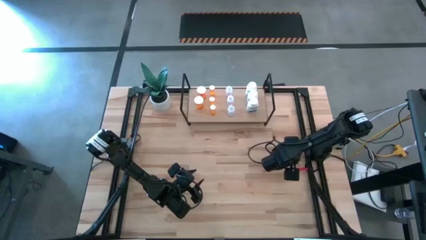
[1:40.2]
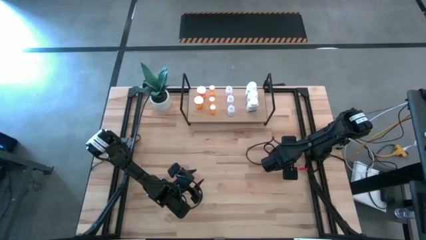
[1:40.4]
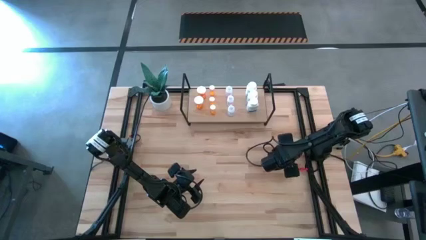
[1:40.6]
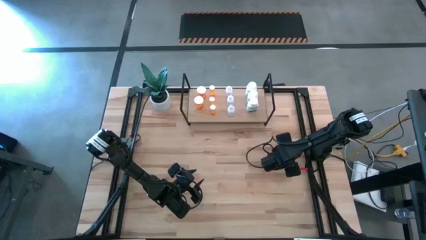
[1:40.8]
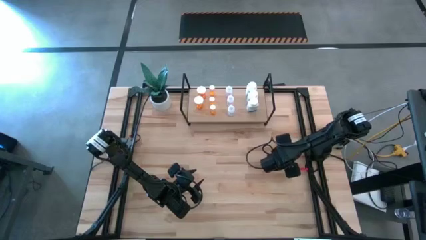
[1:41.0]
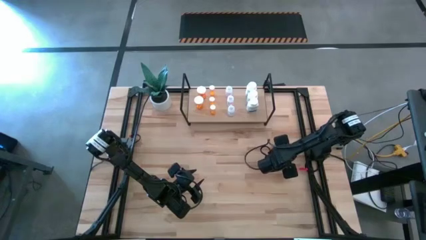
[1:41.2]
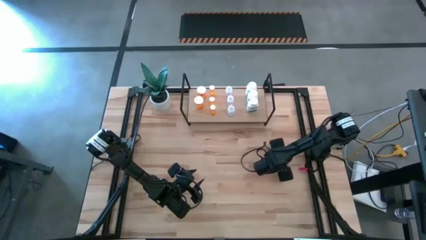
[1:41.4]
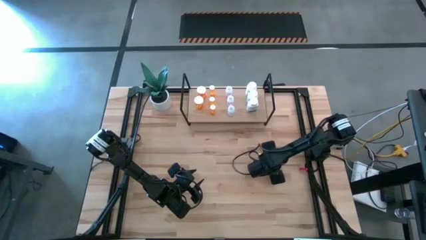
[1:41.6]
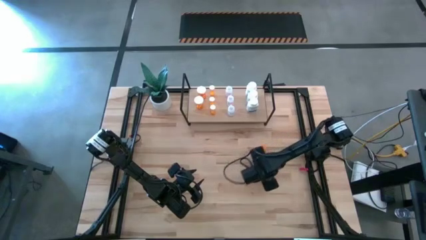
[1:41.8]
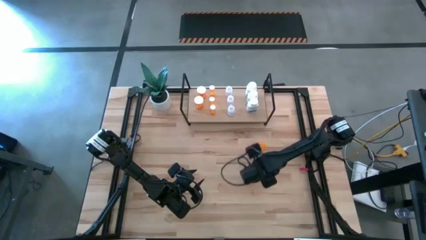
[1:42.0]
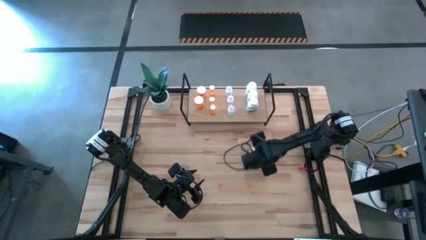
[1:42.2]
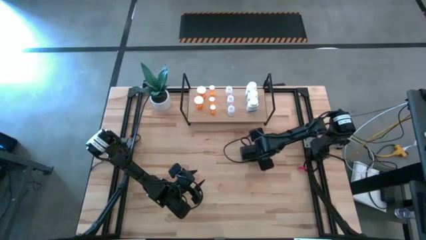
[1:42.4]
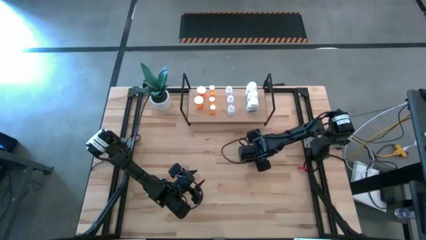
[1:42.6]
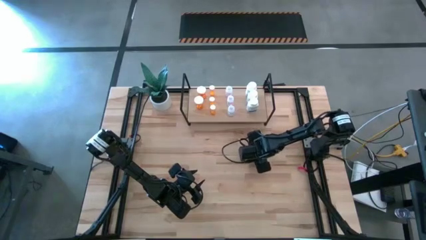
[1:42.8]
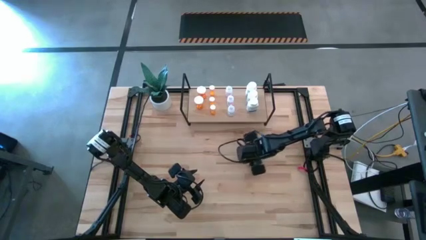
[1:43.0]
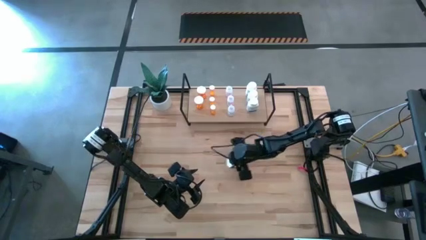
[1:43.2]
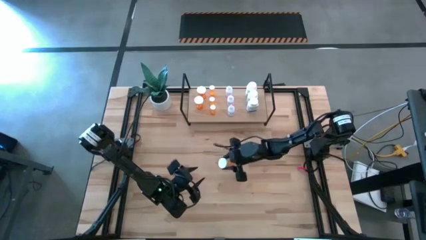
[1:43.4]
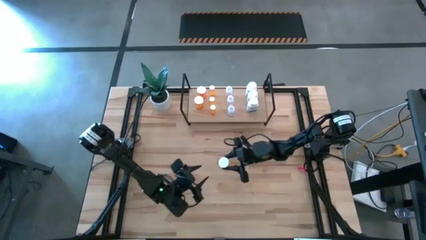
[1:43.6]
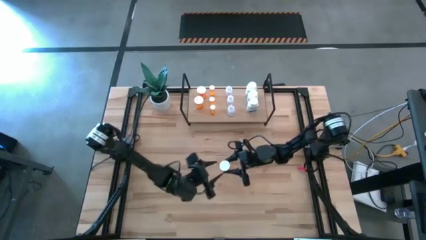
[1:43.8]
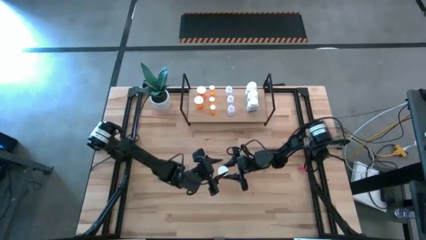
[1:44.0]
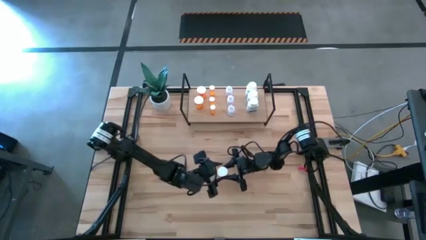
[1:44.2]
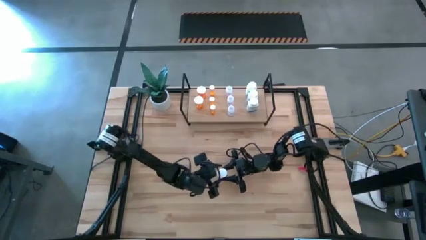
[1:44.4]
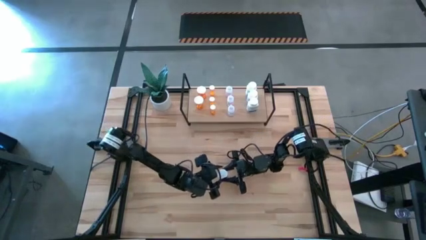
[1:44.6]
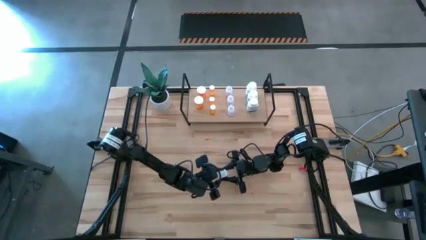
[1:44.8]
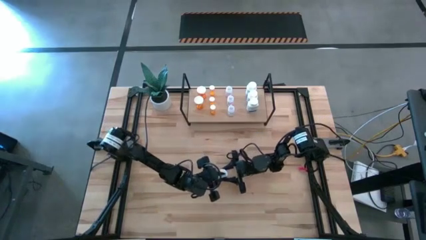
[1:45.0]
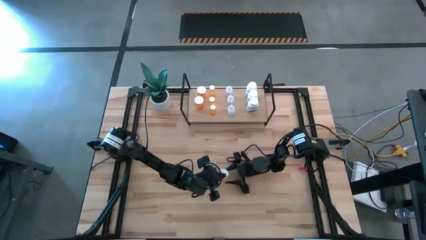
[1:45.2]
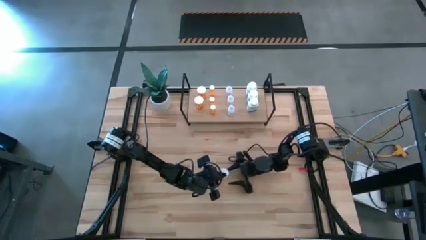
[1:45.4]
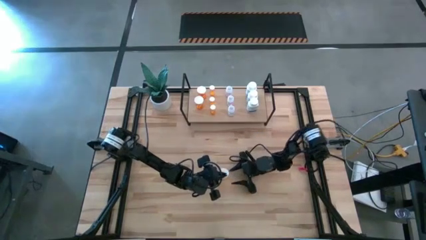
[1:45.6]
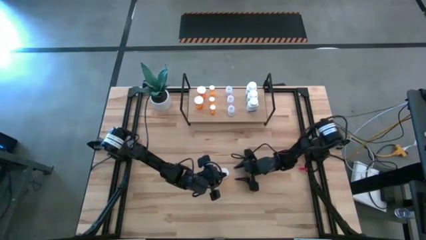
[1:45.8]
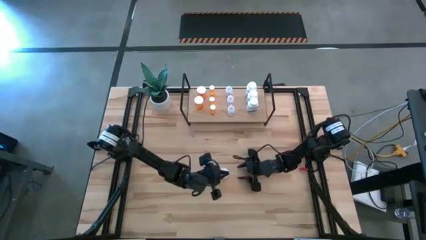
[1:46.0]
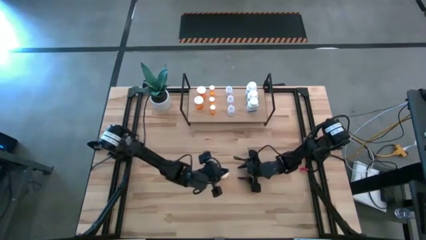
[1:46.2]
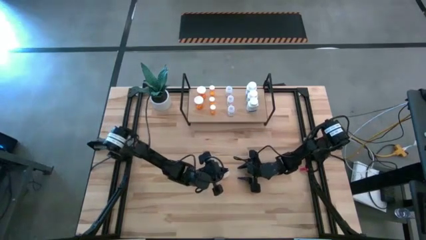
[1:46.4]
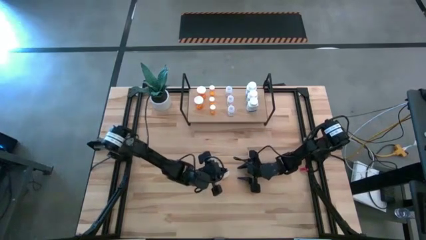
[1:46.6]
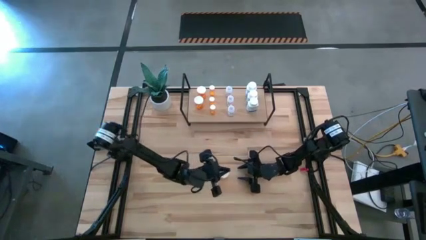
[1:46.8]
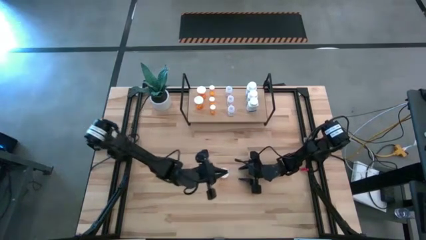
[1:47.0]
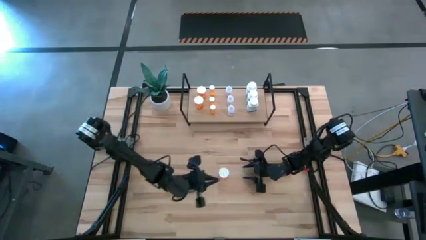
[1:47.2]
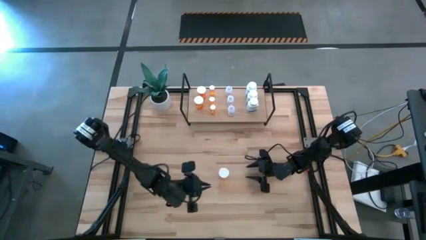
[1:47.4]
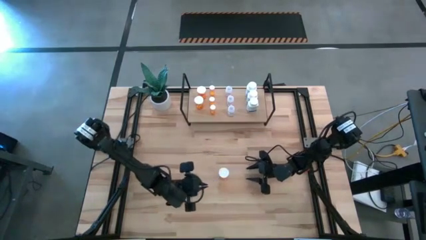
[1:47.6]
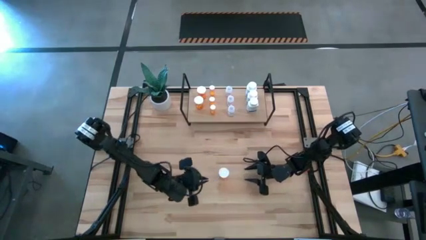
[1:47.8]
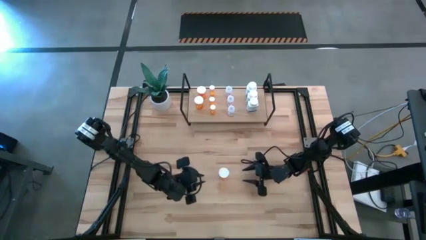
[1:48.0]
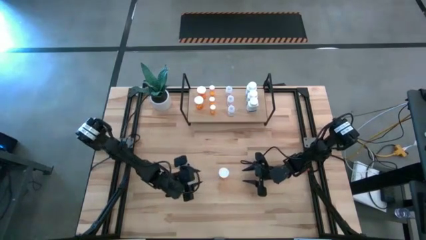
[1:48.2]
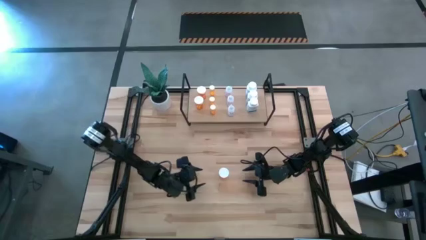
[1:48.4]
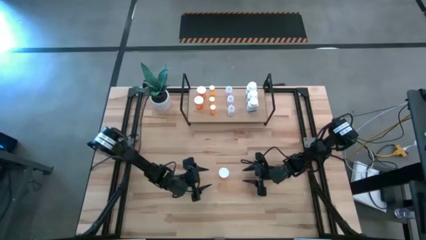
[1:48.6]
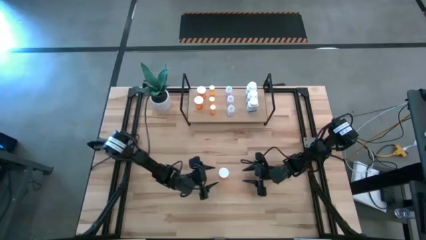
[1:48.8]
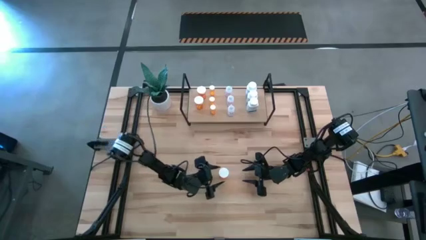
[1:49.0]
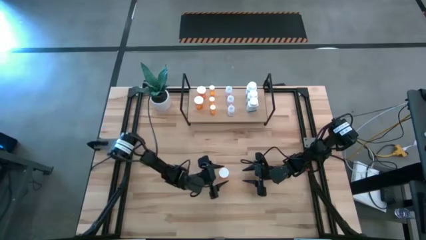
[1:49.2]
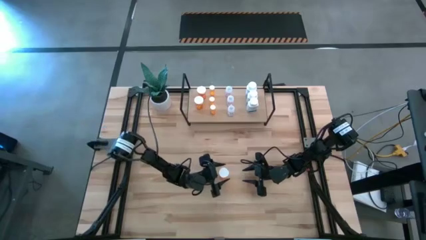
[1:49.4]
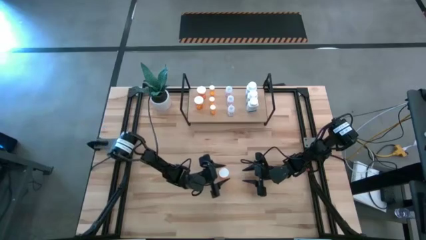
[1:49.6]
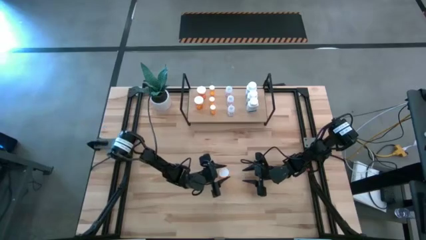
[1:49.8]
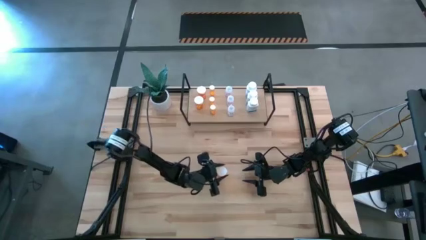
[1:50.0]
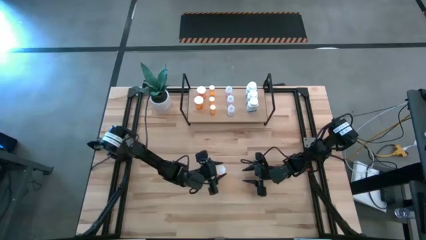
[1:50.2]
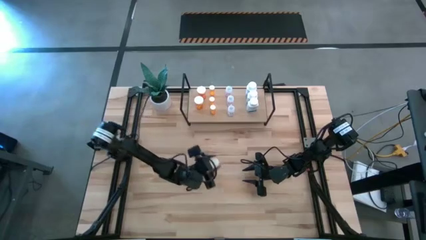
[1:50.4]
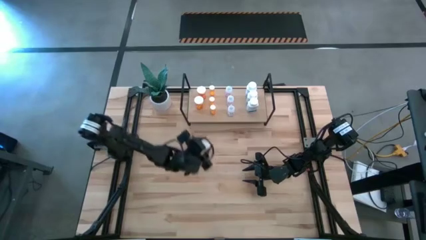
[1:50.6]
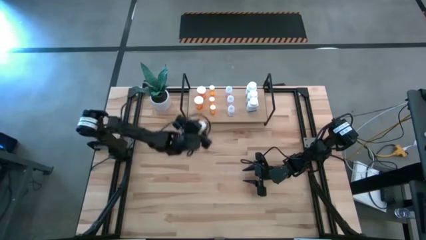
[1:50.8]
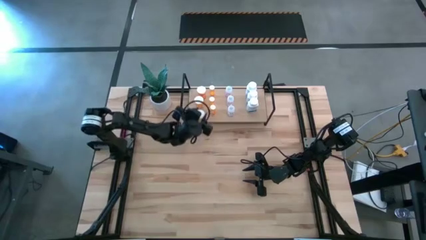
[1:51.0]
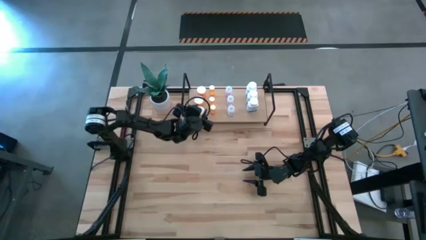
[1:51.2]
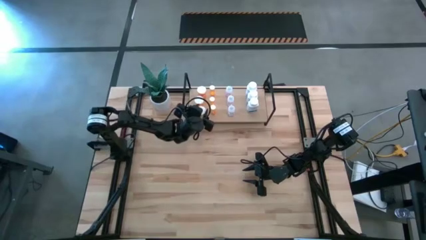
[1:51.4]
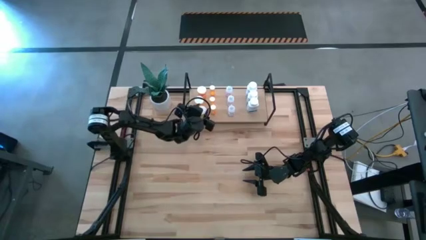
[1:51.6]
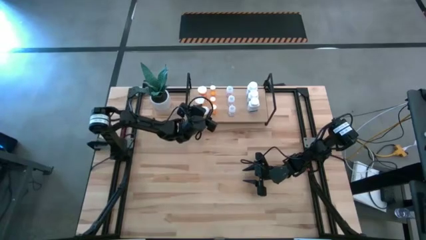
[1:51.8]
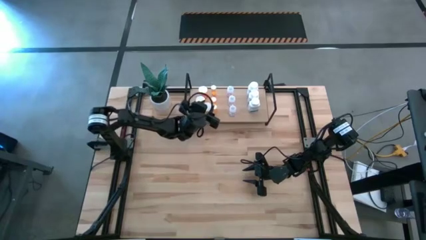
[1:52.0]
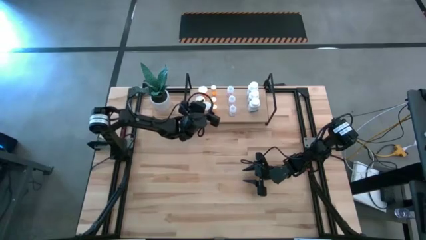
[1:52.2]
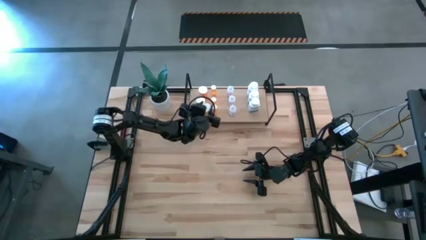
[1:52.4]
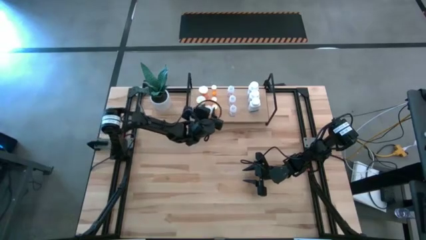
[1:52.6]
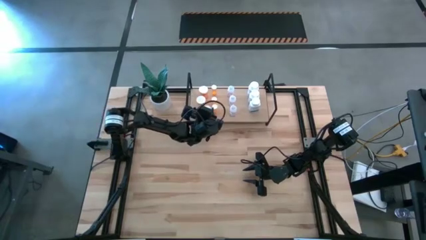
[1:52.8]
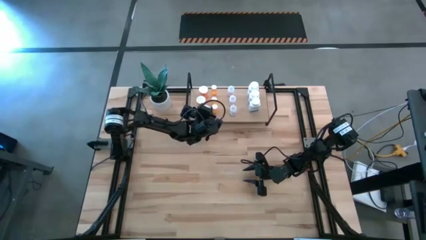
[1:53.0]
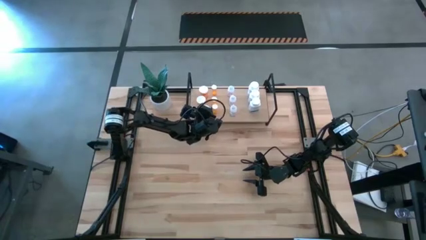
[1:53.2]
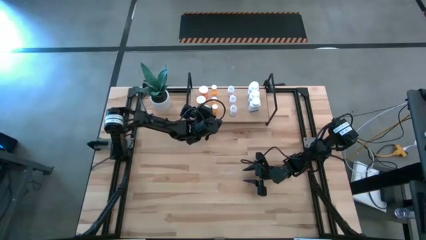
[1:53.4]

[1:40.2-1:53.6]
Task: Pick and place medicine bottles onto shelf by color
Put the large orange pill bottle on the shelf aligned with the large orange pill bottles

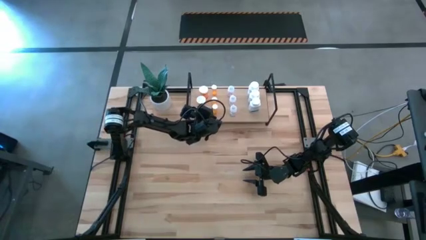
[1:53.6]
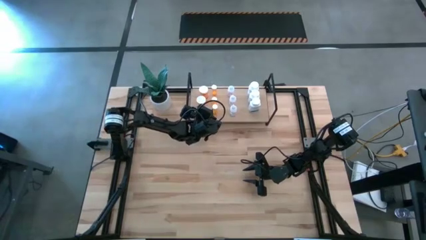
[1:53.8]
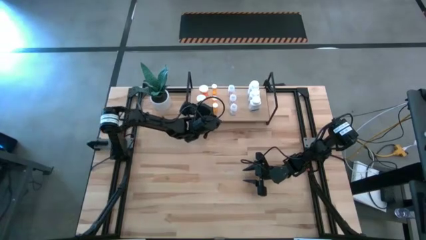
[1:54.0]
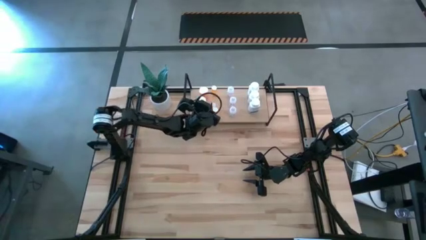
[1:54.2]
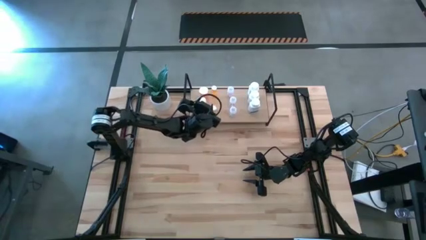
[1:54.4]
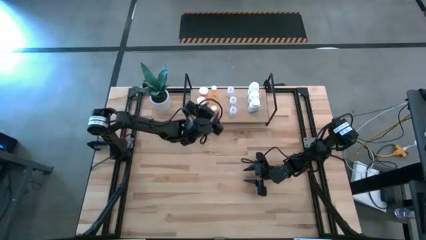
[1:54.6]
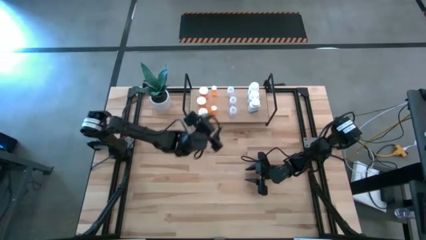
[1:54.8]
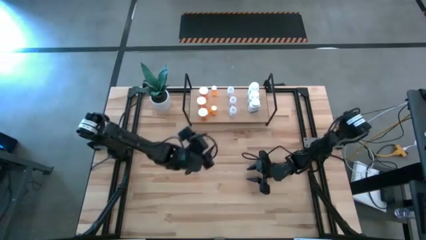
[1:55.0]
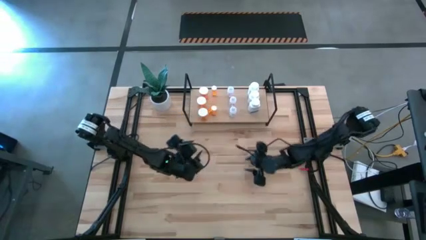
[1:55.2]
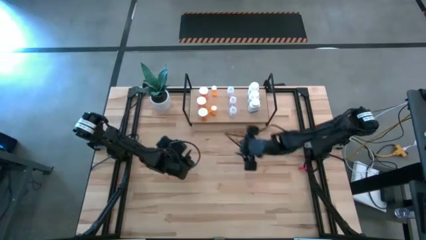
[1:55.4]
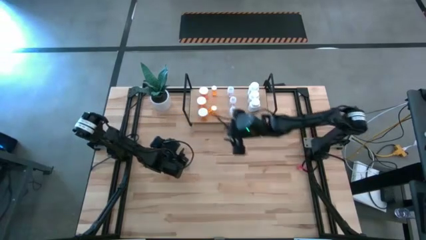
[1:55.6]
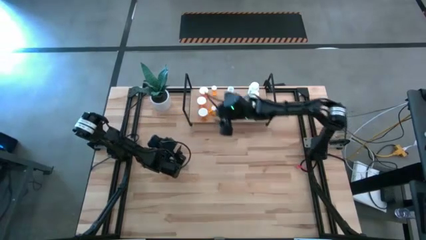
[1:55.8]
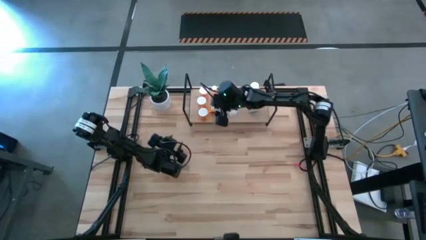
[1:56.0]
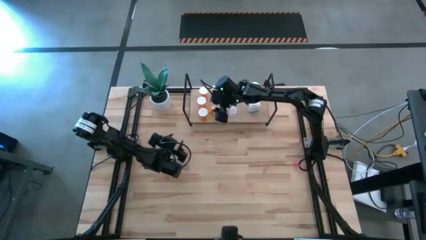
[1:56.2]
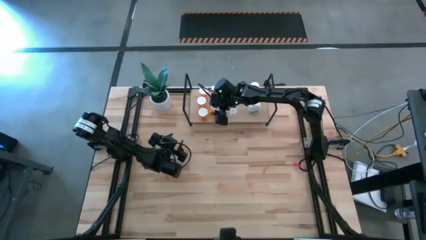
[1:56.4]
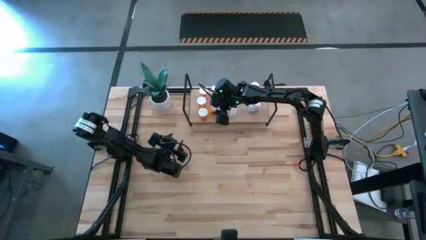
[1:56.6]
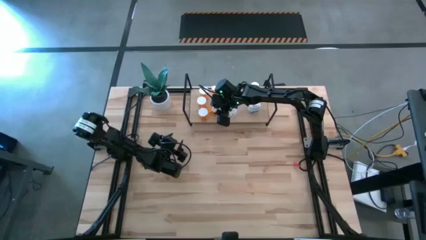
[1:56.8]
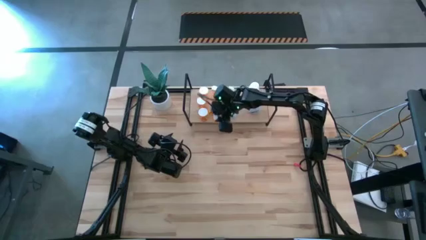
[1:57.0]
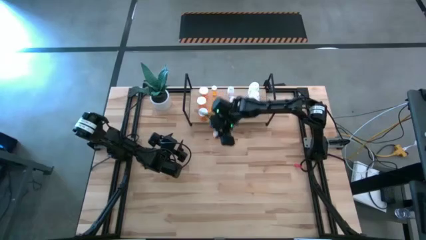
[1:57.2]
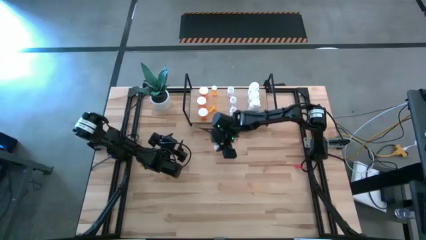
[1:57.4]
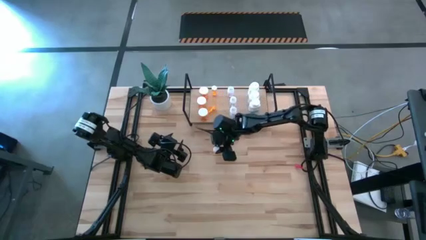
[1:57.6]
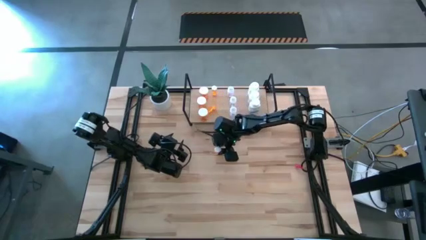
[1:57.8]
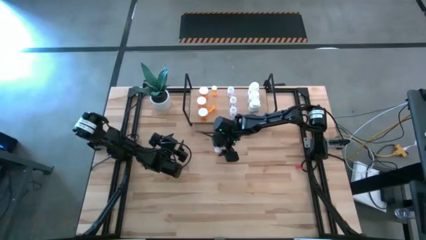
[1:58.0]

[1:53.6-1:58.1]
Remove the small orange pill bottle from the shelf
